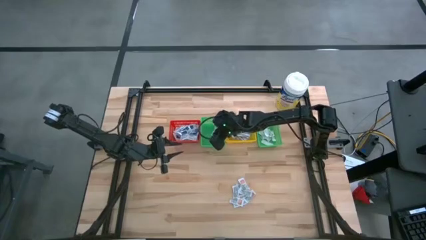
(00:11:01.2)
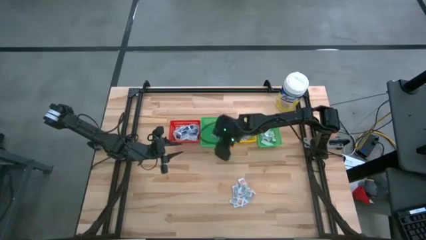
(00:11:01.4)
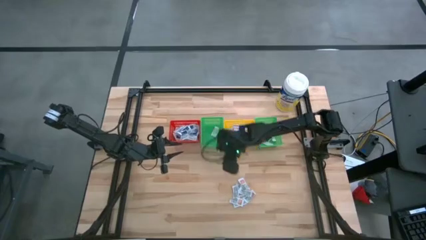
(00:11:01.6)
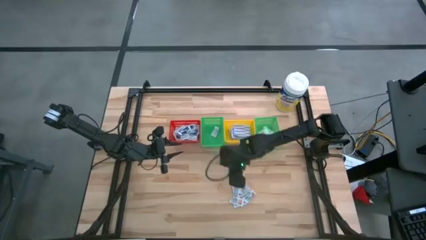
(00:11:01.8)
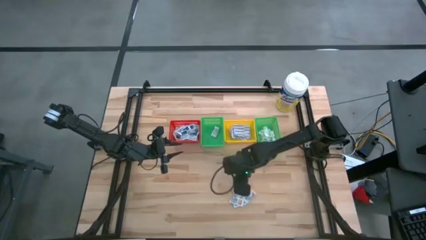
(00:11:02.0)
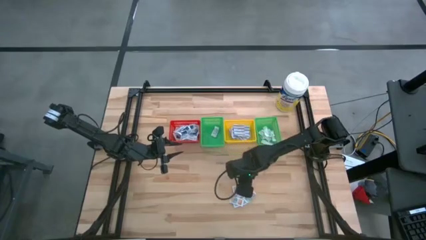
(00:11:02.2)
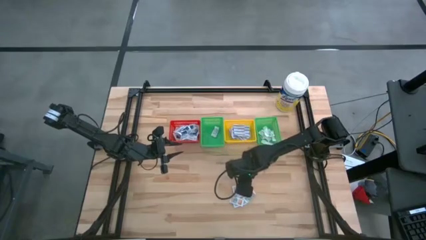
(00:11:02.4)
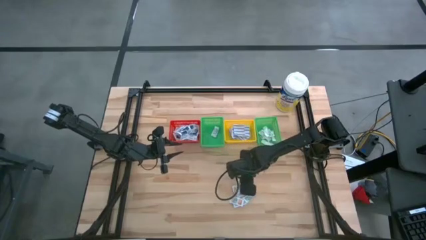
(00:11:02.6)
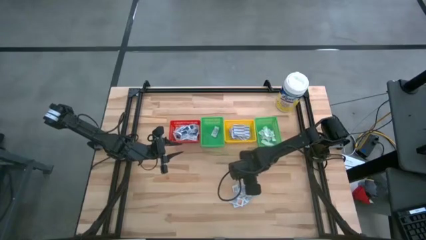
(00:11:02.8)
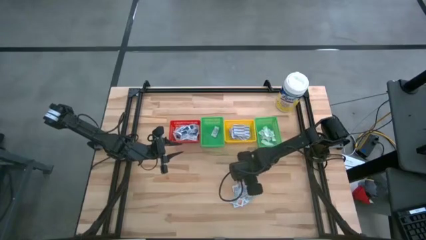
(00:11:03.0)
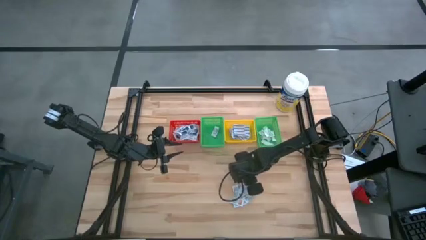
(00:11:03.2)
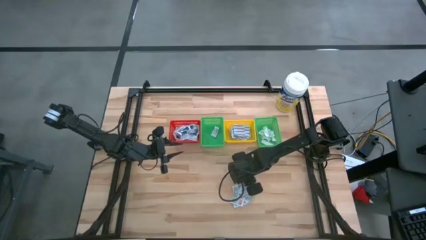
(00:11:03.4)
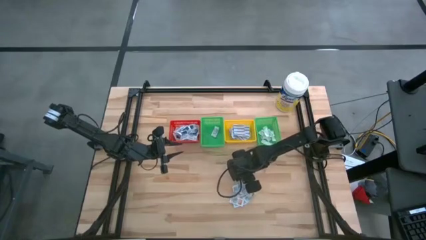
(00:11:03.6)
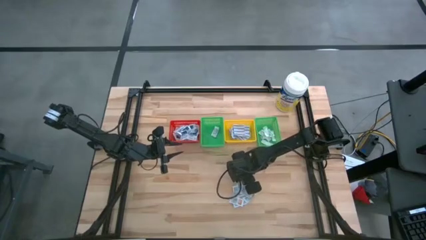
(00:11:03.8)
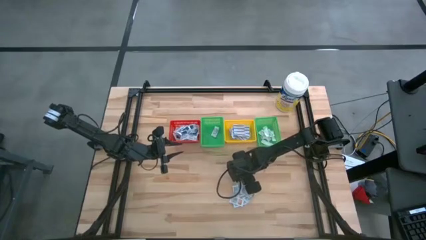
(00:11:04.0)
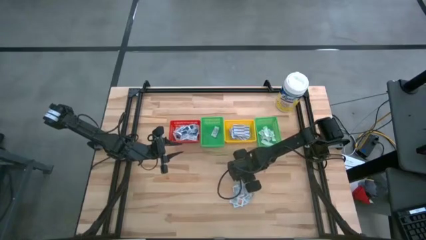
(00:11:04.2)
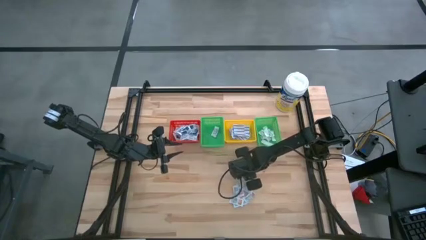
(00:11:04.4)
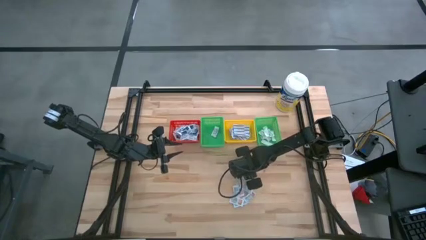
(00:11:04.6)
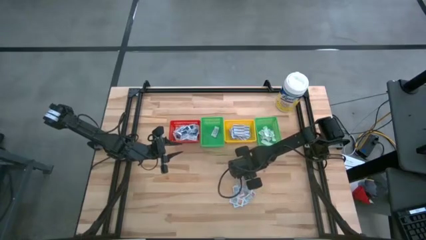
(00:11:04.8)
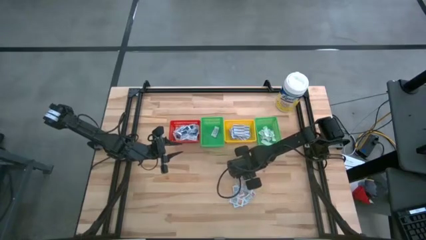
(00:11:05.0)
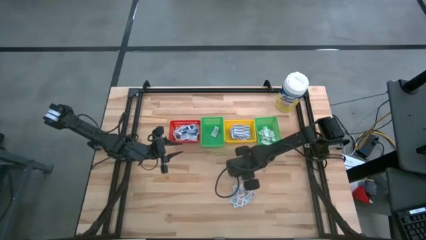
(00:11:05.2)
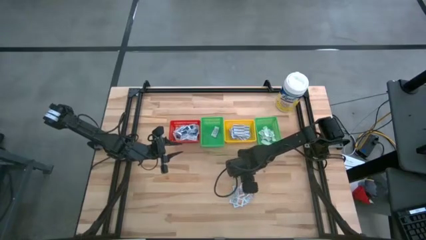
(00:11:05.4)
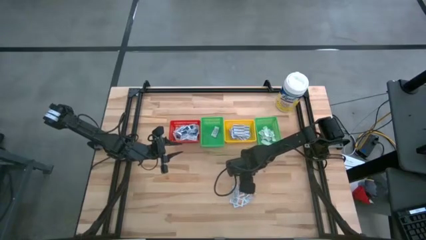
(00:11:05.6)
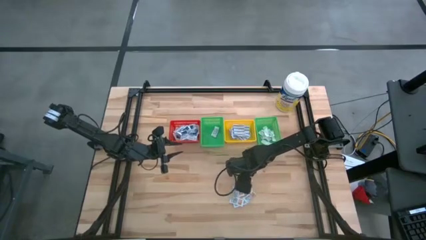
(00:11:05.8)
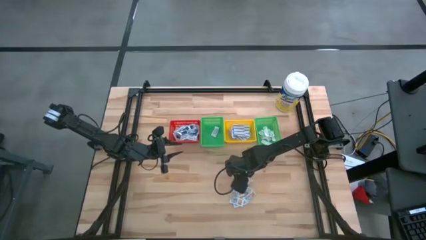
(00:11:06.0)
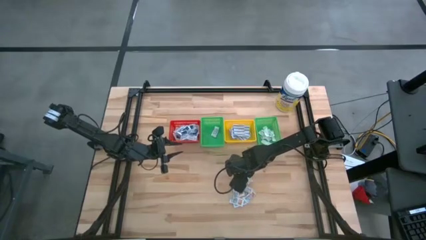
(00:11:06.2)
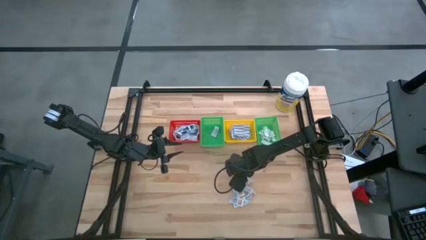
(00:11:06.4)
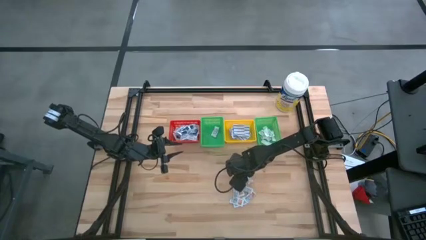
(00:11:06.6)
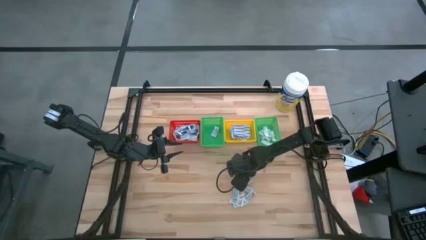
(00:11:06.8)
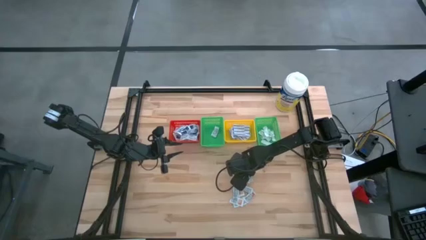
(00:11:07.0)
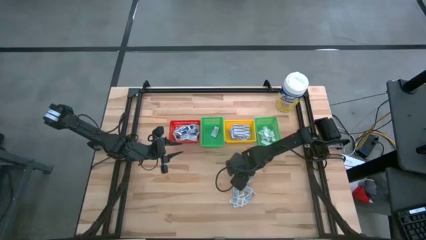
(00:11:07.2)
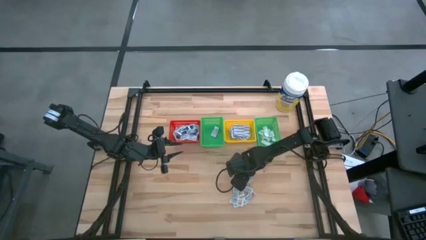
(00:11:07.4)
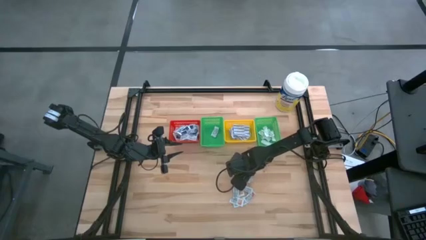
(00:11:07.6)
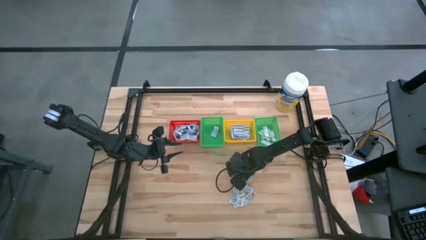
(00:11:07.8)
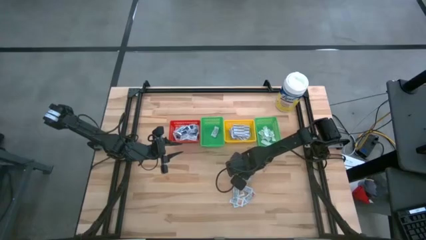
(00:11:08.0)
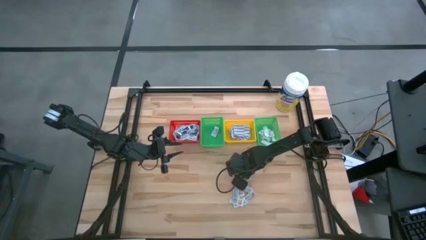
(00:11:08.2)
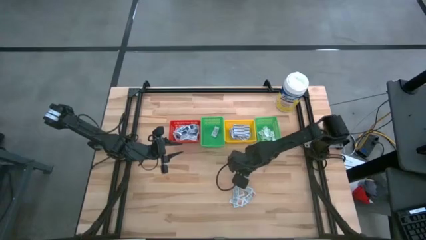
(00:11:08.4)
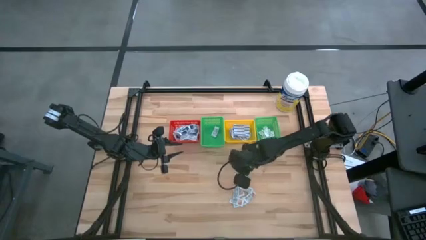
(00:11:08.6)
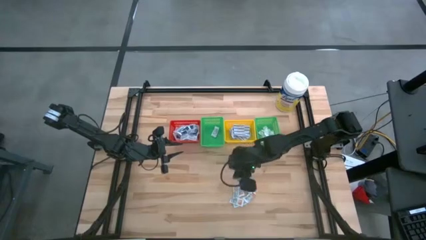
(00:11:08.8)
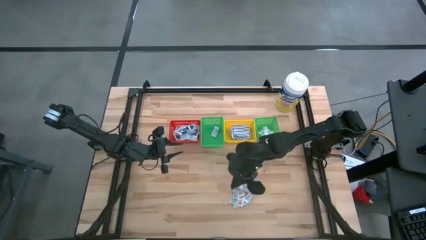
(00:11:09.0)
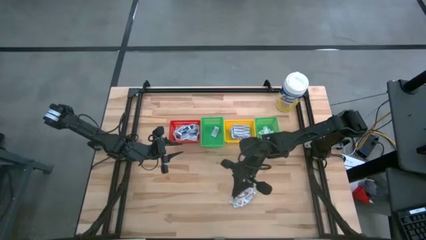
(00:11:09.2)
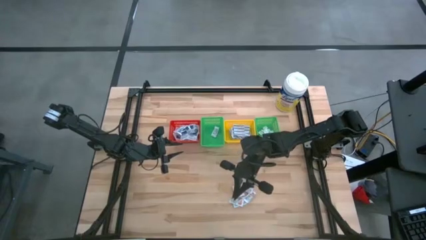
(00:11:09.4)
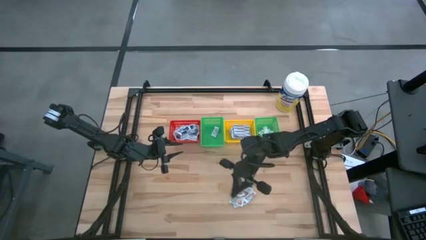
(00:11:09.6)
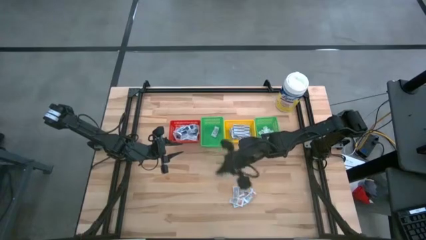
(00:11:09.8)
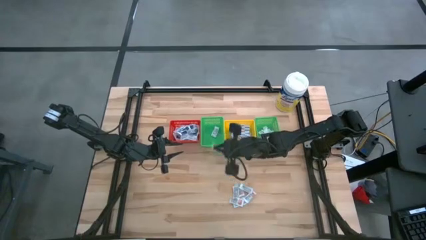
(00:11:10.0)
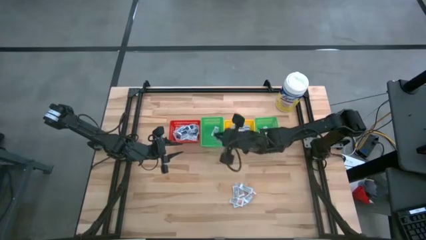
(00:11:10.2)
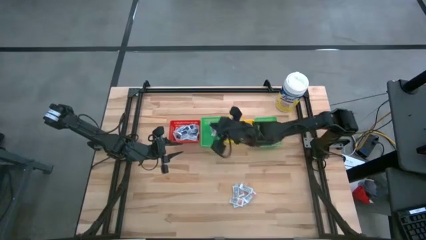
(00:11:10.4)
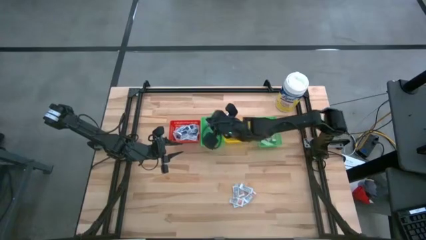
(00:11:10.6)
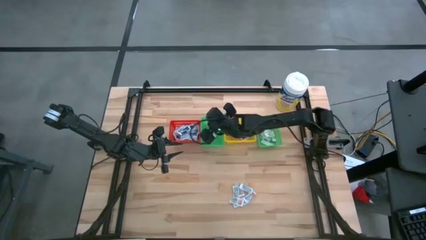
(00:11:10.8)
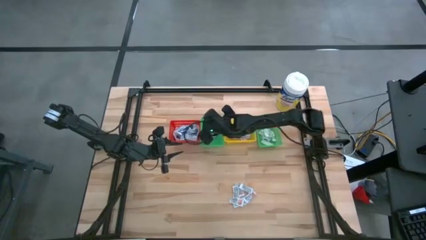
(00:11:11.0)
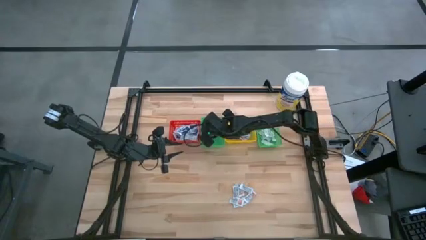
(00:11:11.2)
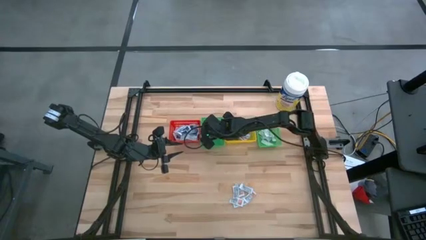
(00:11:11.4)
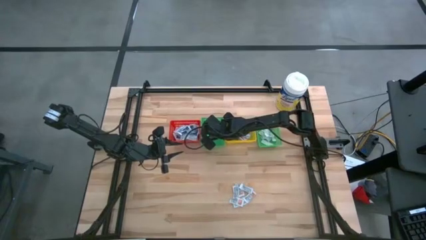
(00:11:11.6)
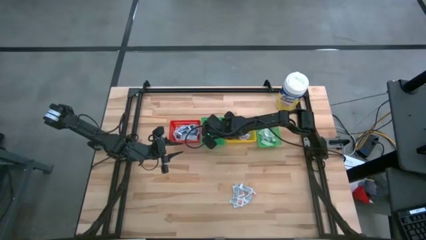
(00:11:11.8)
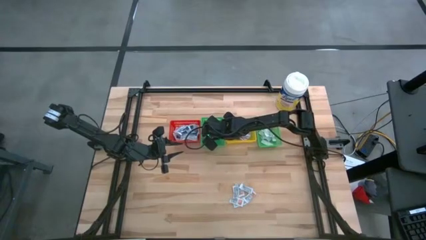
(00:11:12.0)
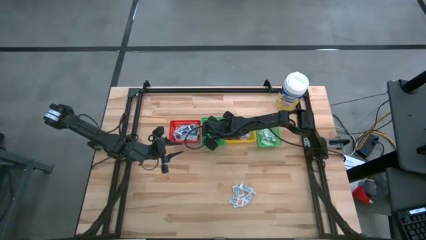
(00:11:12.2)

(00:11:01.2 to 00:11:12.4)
Task: Pick & Place First Aid Supplies
Put the ointment pack into the left green basket

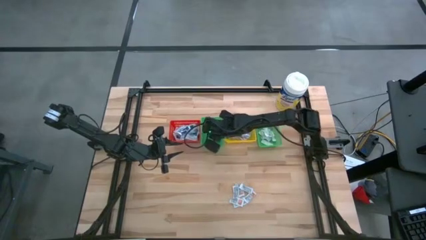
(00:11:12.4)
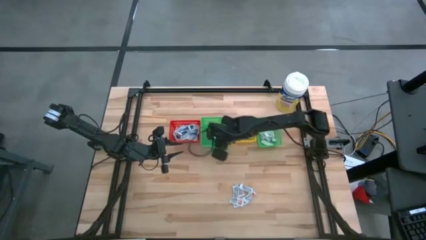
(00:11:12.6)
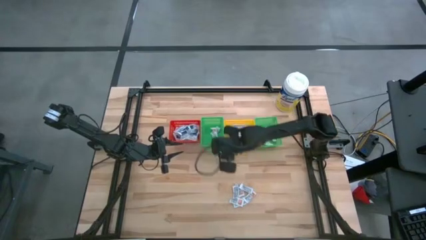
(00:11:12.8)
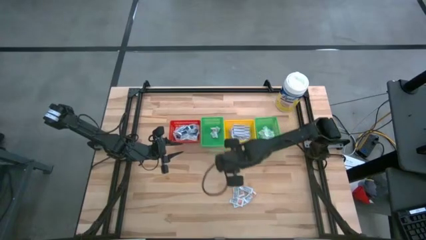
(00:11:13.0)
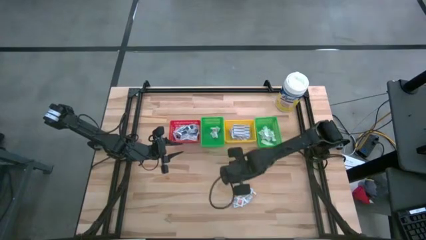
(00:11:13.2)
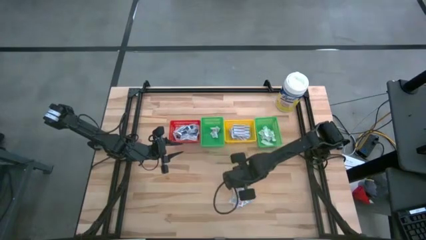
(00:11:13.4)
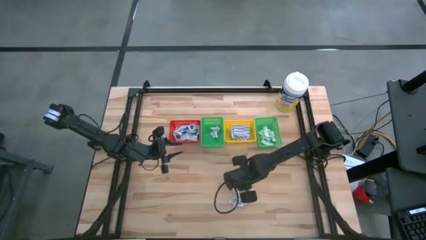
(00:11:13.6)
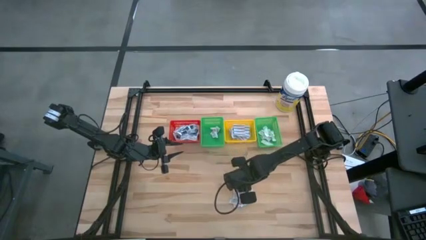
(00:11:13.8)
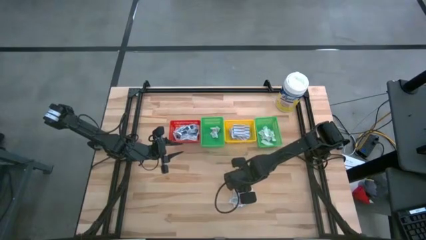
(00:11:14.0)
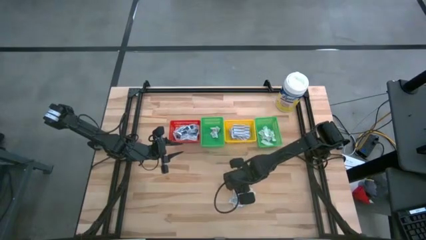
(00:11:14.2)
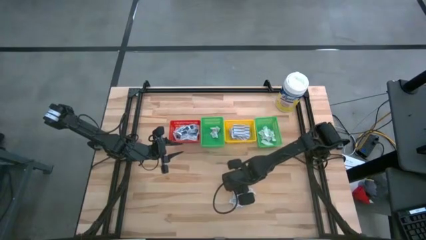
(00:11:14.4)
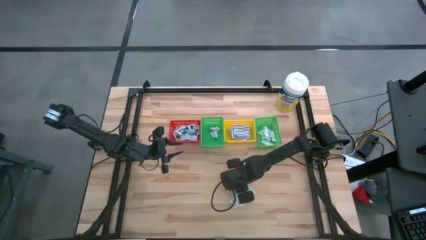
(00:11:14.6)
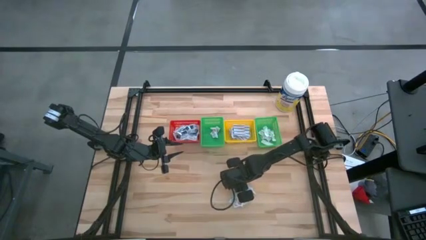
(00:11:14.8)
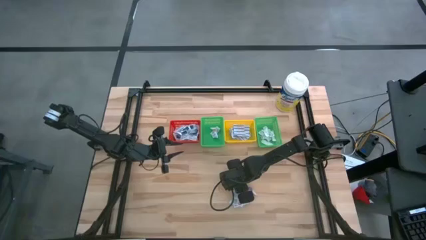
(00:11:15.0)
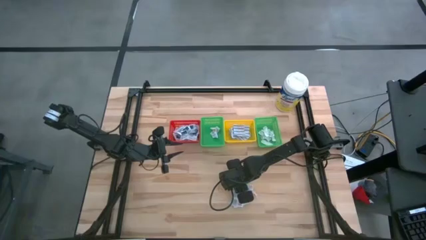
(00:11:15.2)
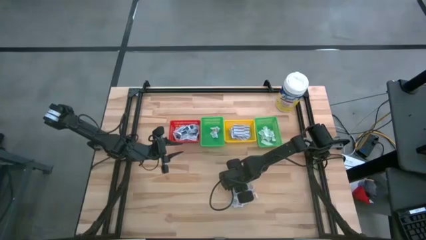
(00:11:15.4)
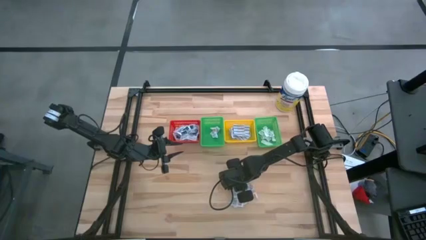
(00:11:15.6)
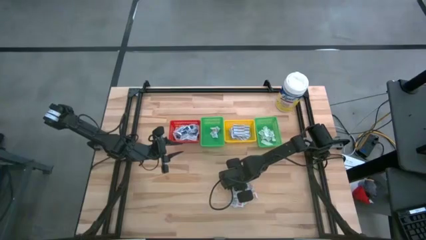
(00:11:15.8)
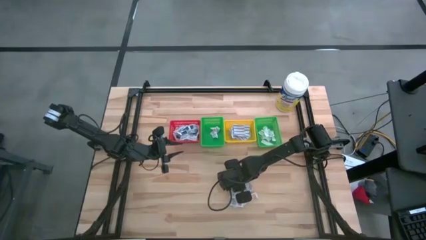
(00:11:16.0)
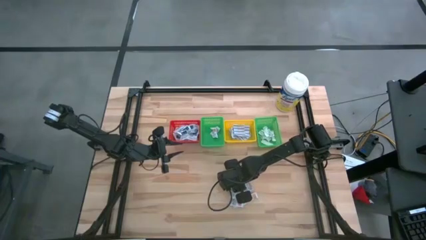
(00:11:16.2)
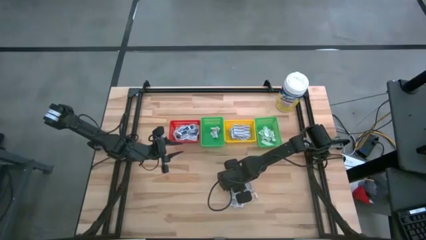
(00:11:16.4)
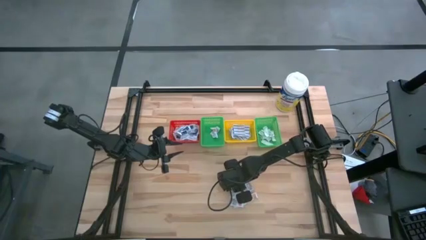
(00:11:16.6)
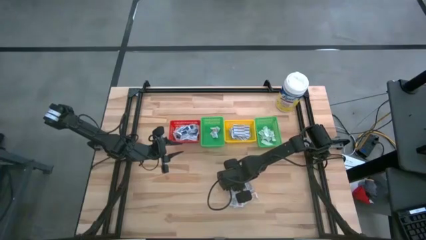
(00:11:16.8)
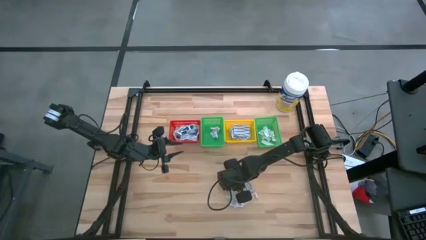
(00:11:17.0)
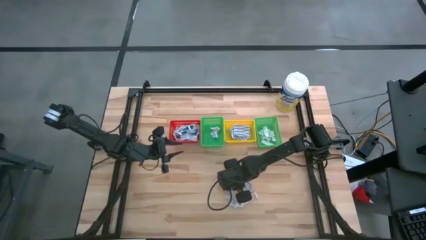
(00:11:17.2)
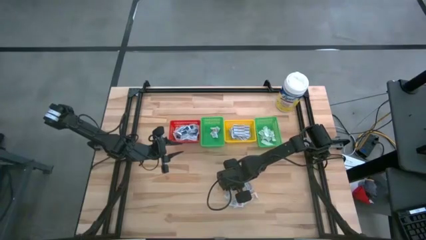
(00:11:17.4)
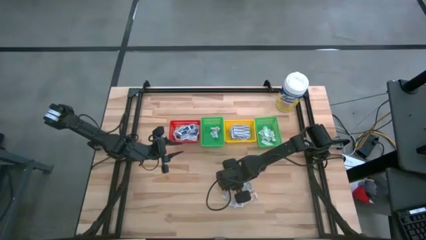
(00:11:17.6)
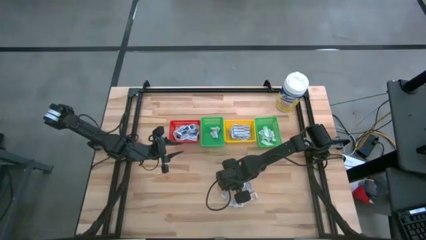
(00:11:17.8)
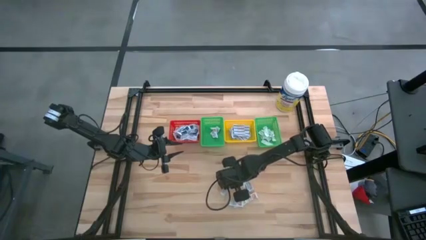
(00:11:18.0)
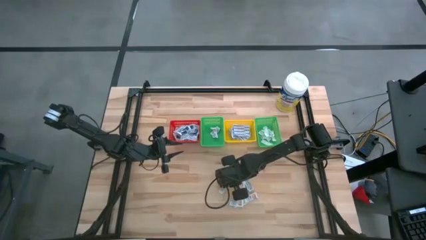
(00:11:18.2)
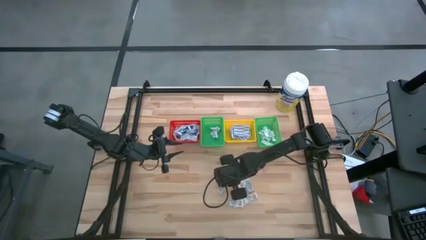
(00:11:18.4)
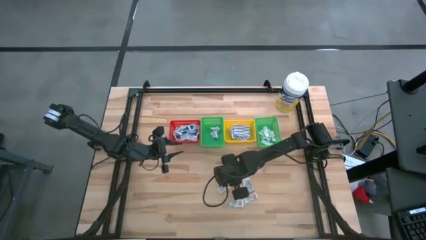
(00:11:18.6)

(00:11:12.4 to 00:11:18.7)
Put the ointment pack into the left green basket
